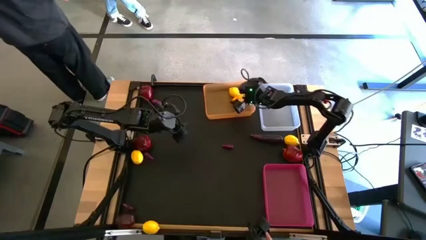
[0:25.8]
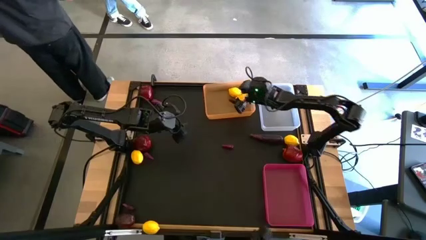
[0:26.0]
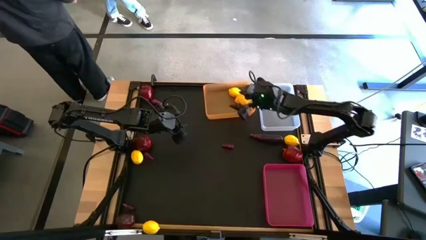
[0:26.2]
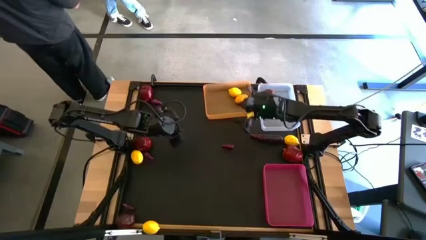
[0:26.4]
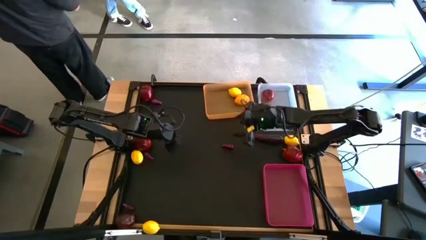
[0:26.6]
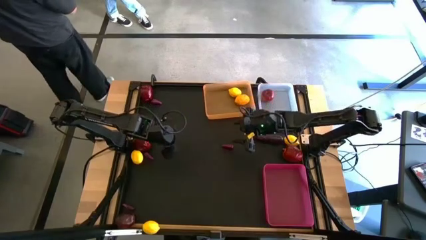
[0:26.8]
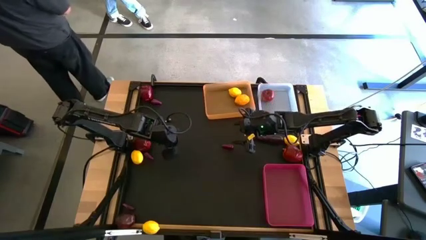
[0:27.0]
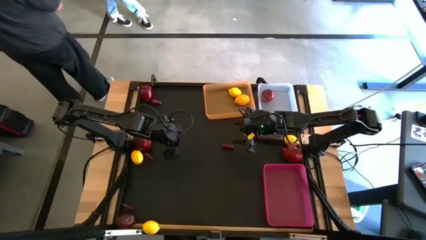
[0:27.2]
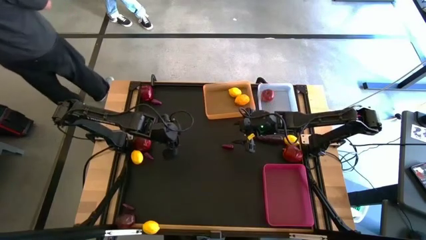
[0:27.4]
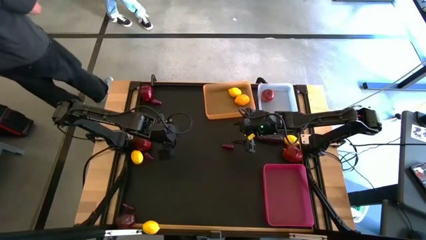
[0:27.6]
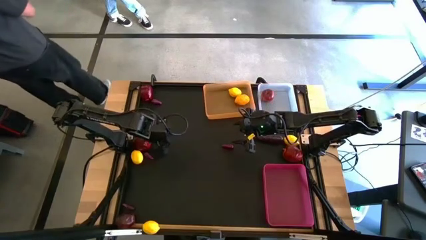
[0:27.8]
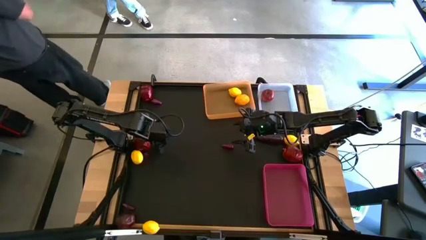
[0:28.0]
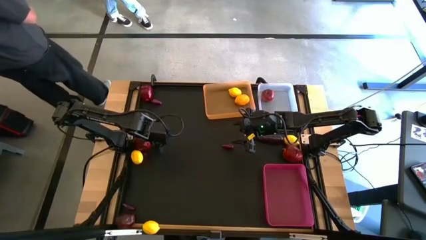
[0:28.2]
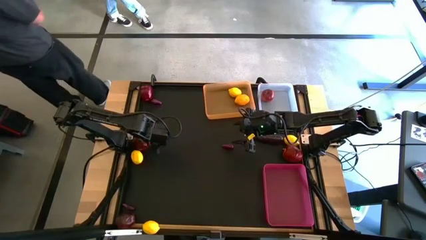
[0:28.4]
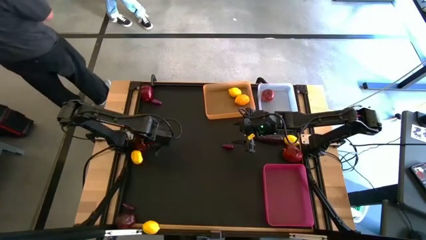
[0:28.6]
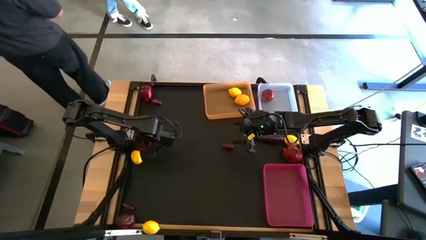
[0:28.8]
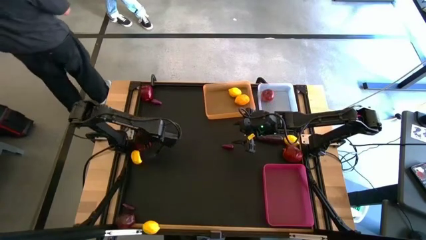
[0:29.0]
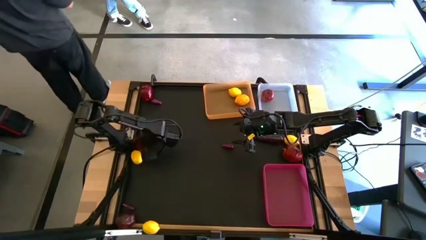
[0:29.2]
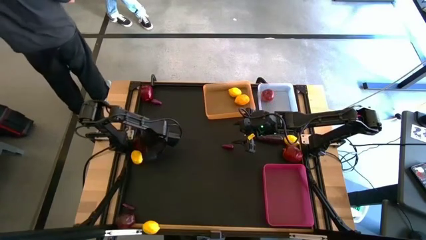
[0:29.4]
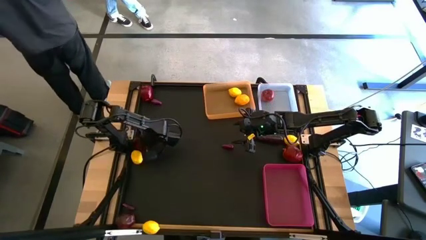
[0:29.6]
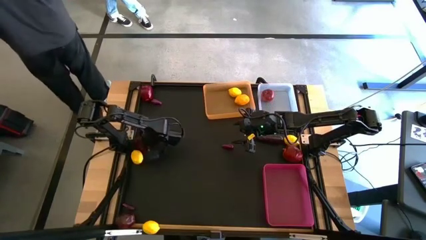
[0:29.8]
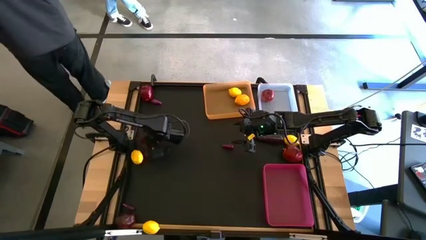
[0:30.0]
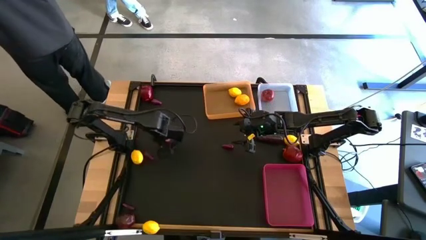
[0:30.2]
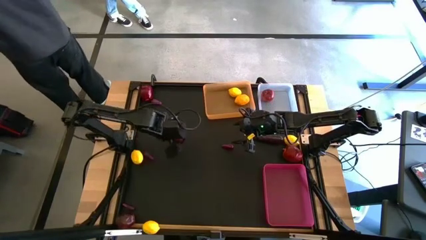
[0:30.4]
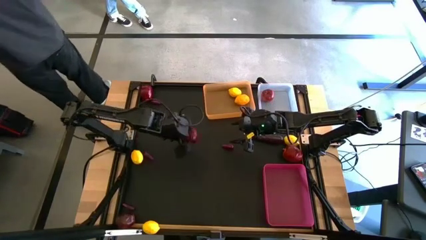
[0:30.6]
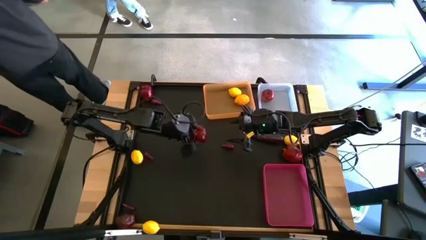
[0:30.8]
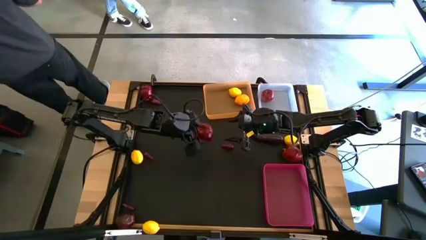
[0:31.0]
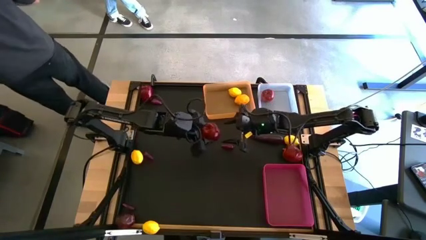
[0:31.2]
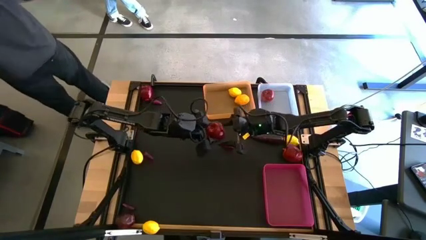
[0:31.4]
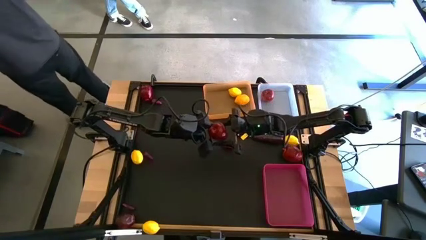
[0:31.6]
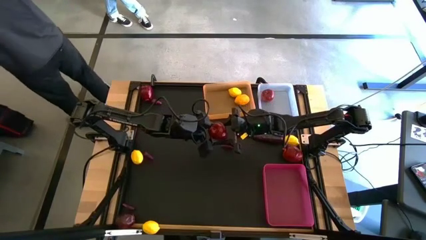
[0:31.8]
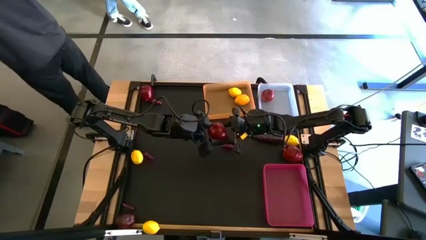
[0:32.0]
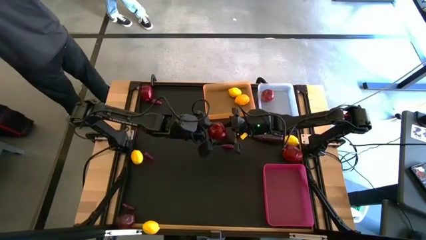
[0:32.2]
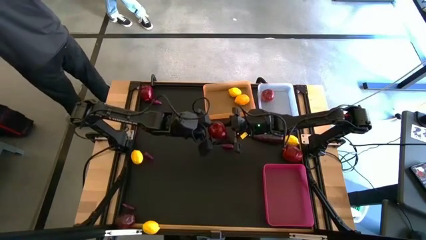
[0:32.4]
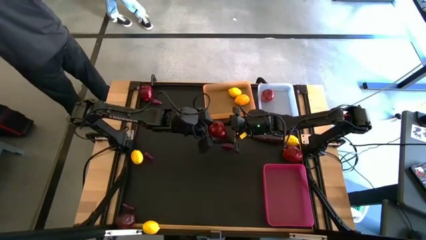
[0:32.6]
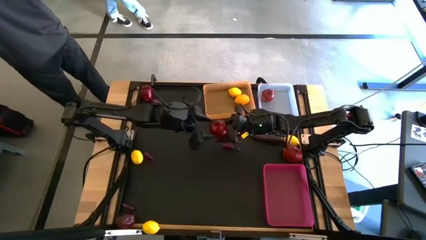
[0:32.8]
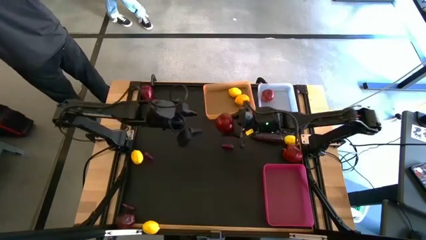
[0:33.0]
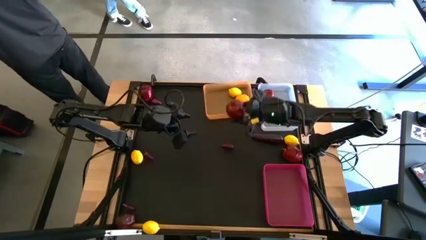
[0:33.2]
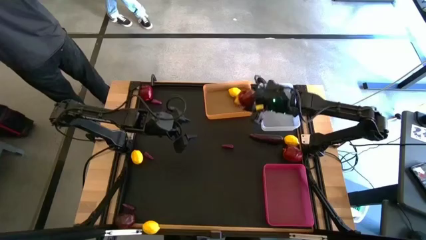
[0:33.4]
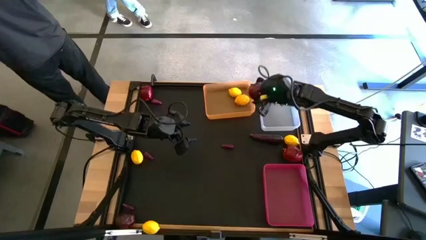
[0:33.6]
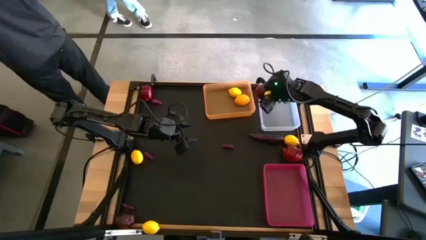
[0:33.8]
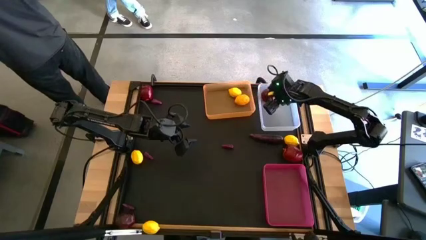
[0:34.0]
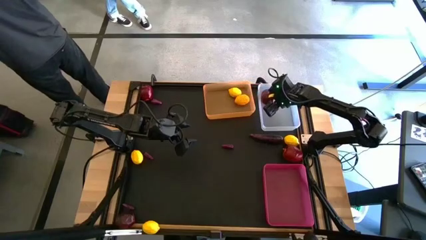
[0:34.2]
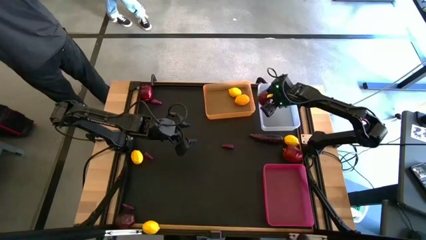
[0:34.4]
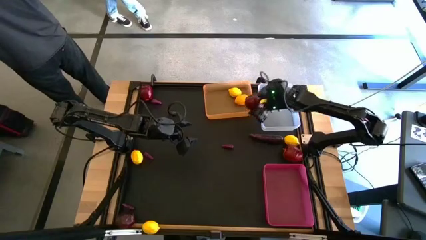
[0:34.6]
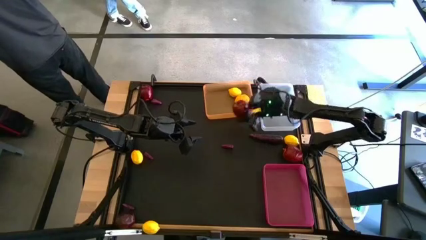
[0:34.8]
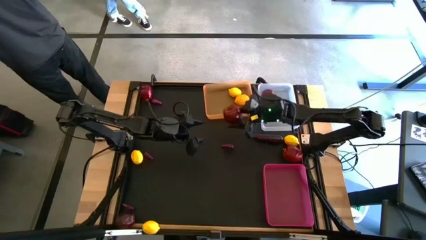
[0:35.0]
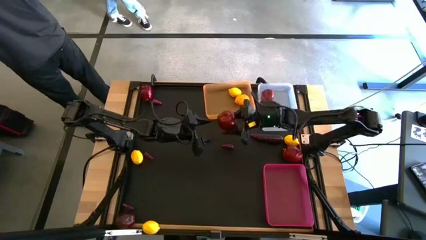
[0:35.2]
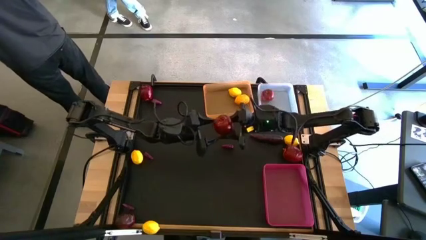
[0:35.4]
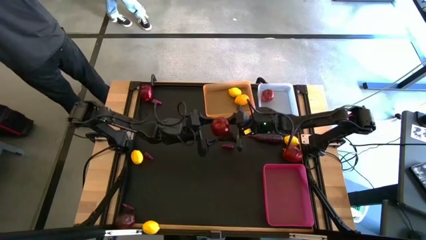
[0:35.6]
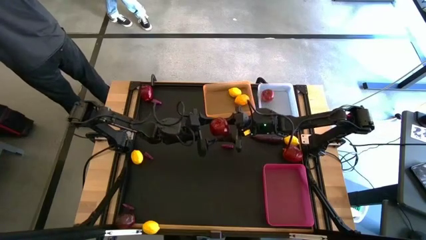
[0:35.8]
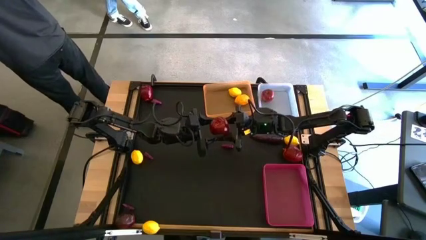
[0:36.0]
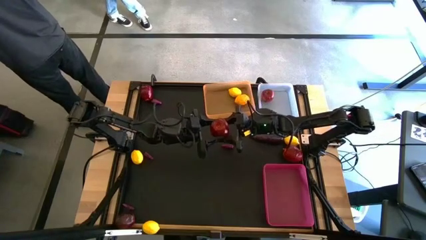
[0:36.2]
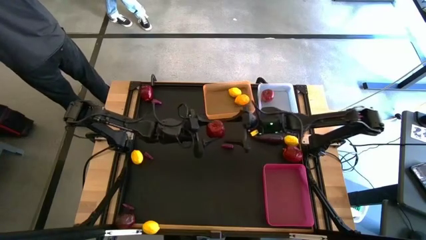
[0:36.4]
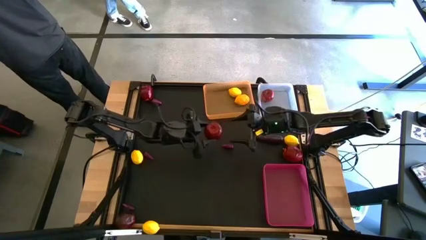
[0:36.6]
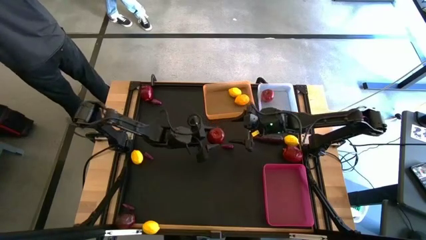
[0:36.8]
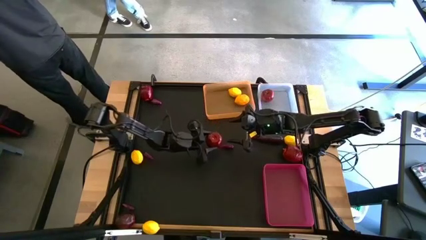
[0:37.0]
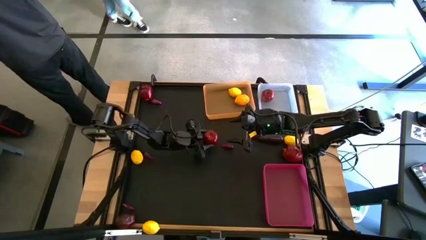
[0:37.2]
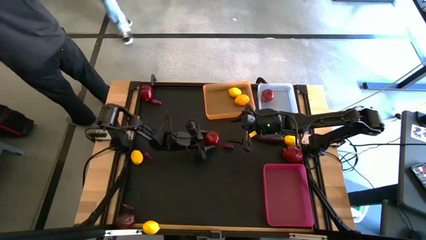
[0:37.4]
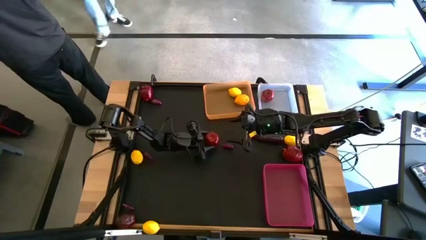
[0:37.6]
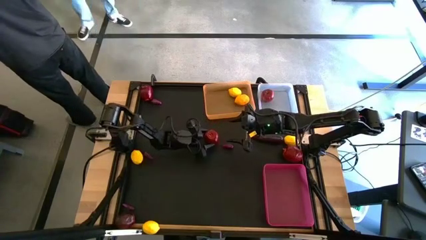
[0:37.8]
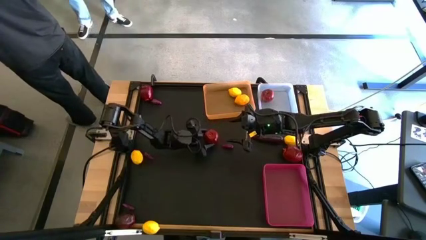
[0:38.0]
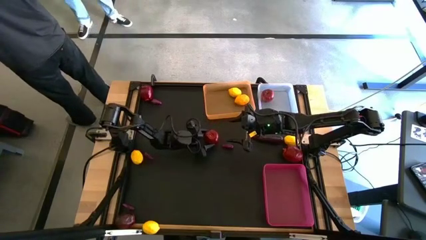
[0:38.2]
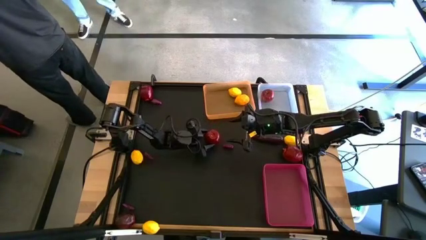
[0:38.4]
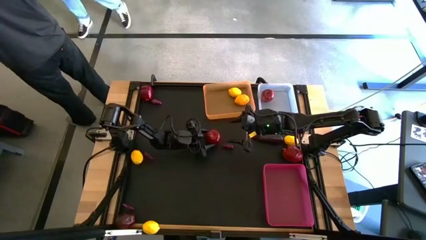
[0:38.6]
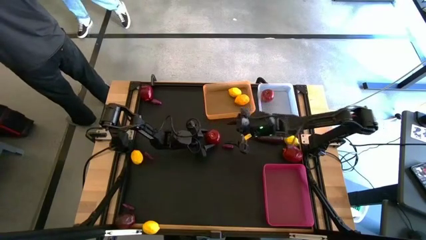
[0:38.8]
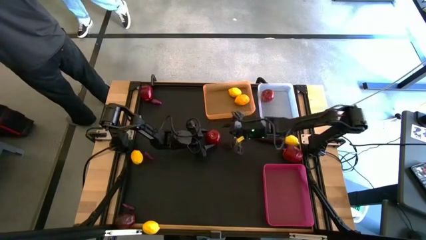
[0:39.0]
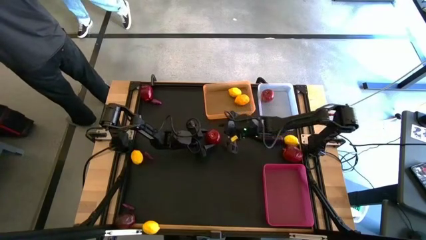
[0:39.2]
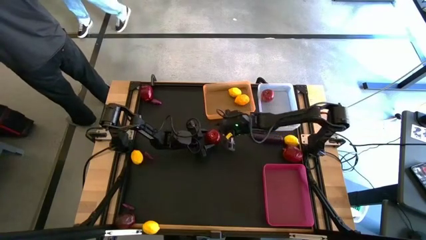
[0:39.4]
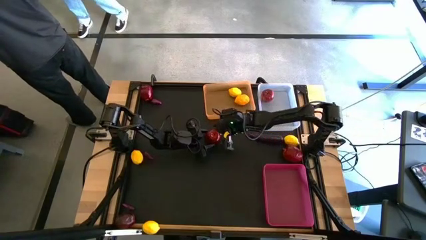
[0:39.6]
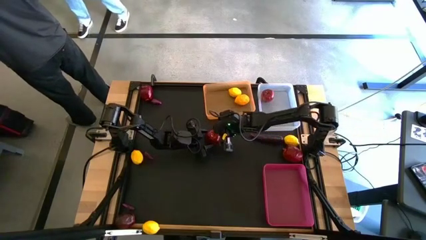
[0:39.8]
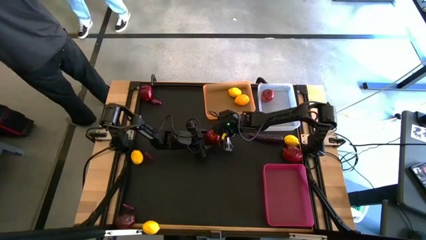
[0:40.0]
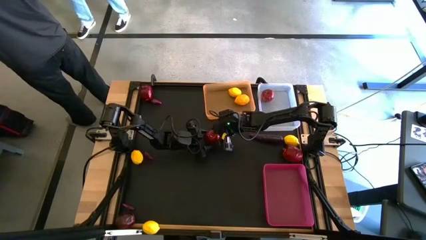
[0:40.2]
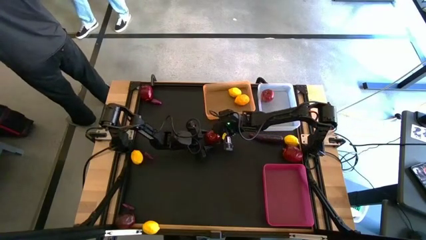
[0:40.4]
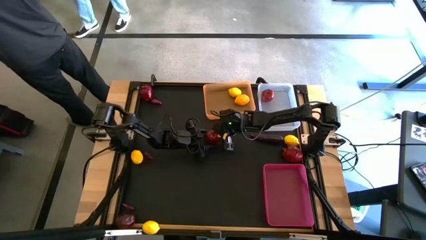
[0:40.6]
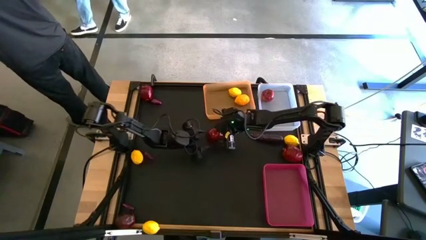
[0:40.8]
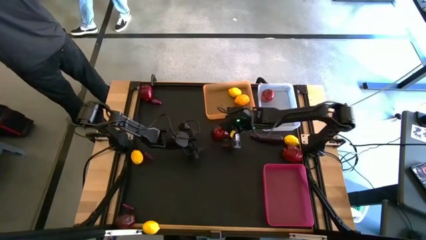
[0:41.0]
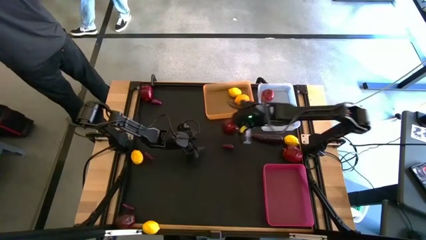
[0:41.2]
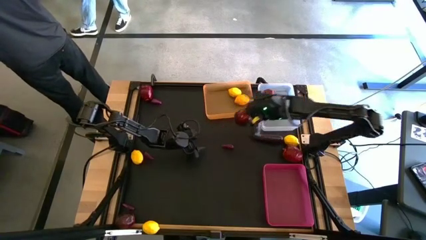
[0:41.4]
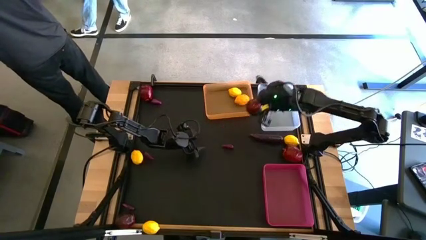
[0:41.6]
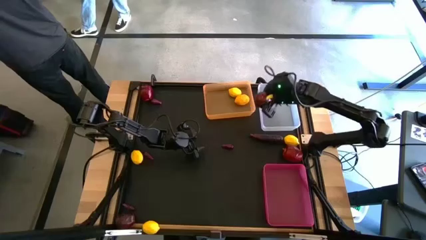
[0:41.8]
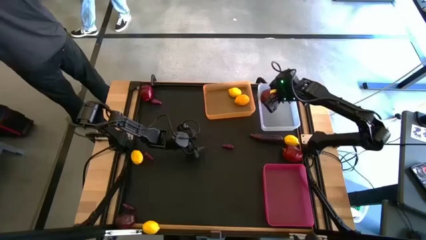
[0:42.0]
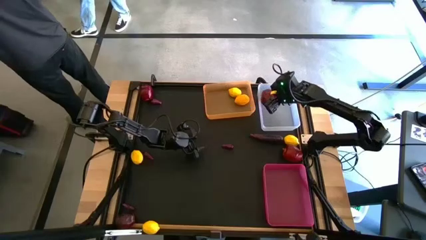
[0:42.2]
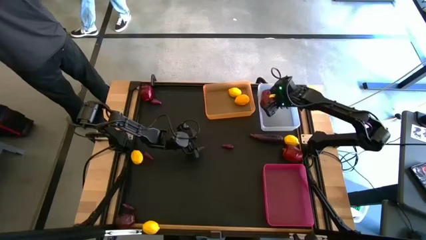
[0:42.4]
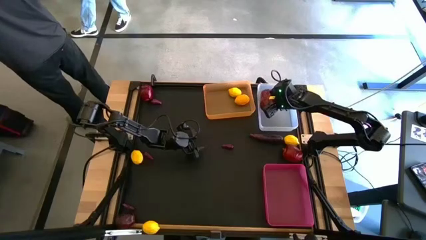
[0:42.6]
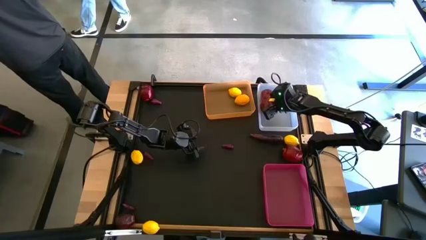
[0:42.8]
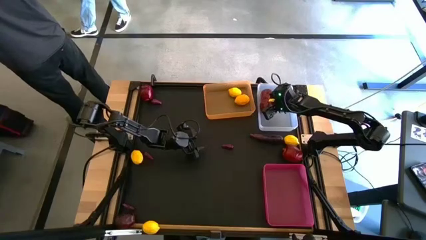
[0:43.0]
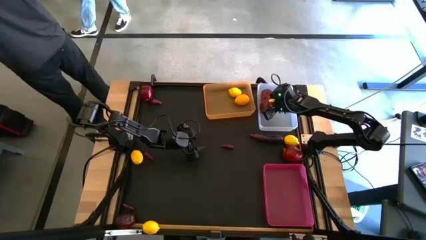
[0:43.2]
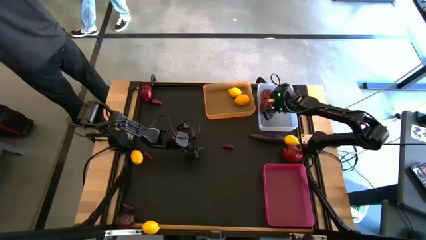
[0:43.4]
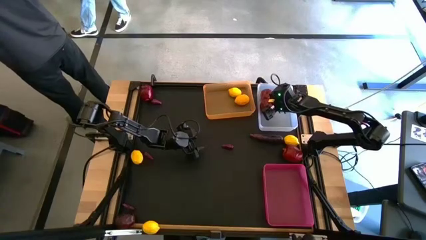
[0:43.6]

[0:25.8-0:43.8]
Task: Sort produce into baskets
Put the red apple into the white bin
